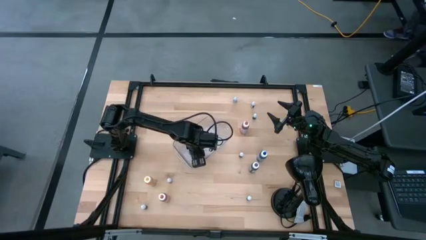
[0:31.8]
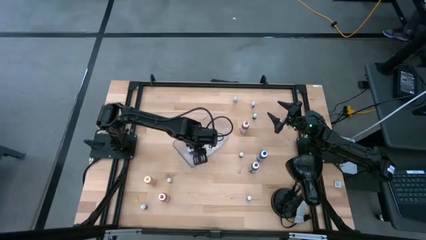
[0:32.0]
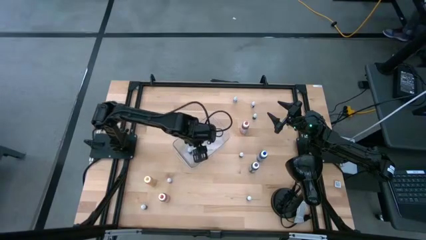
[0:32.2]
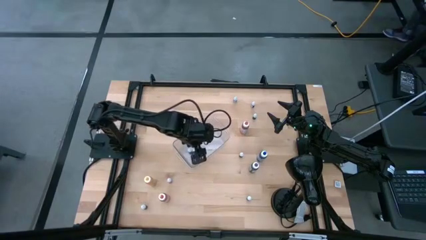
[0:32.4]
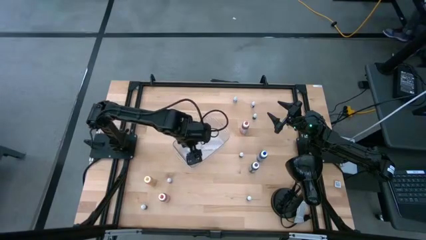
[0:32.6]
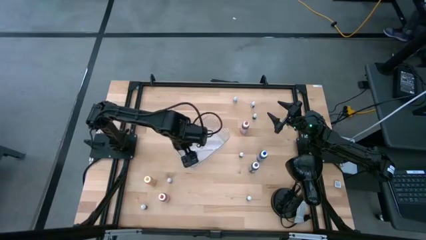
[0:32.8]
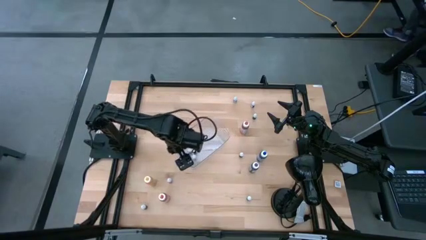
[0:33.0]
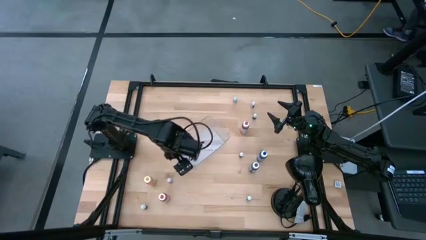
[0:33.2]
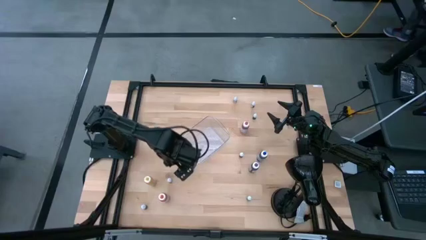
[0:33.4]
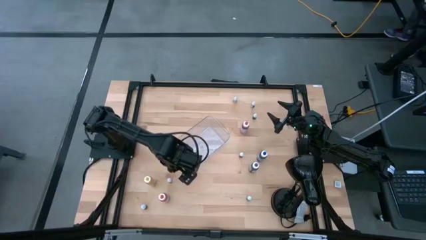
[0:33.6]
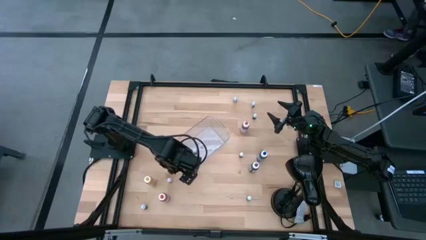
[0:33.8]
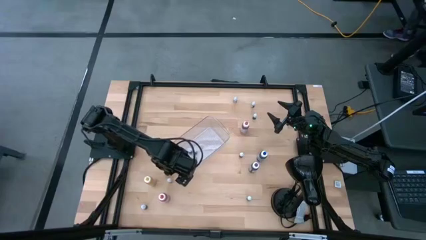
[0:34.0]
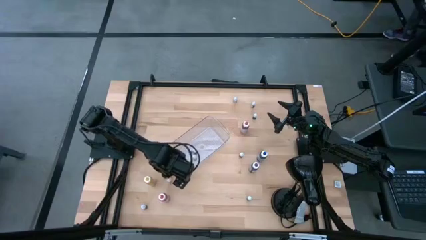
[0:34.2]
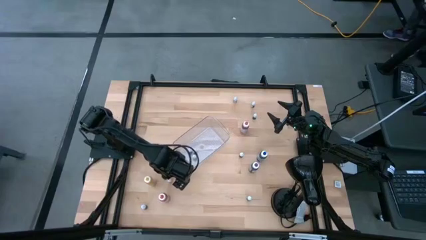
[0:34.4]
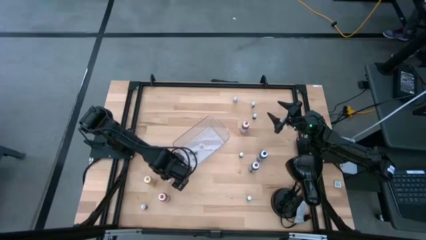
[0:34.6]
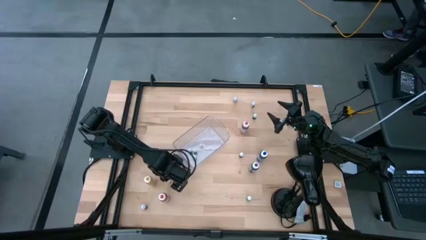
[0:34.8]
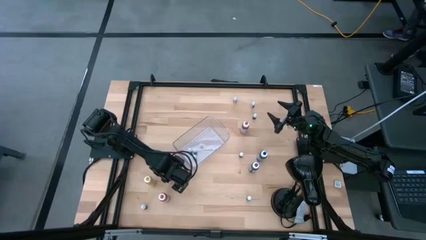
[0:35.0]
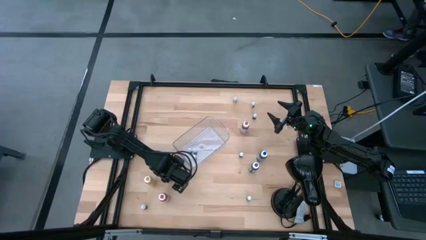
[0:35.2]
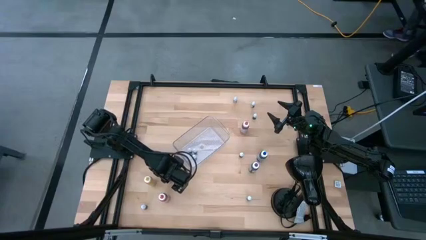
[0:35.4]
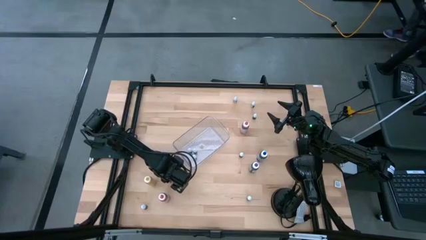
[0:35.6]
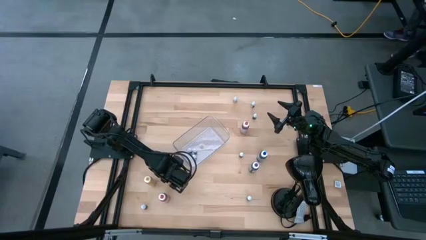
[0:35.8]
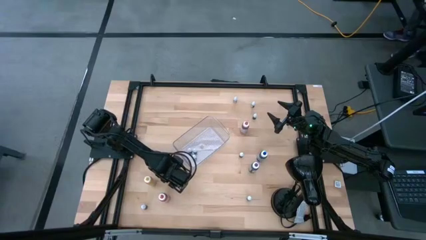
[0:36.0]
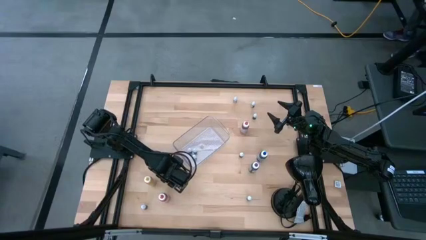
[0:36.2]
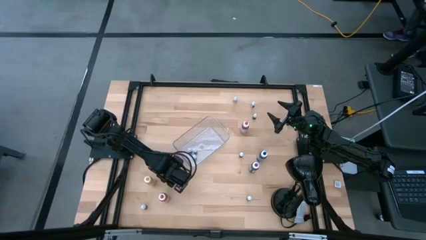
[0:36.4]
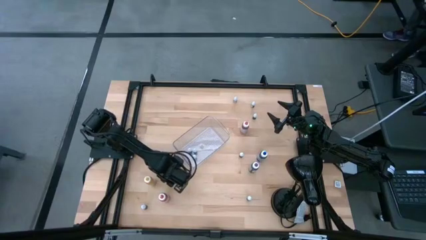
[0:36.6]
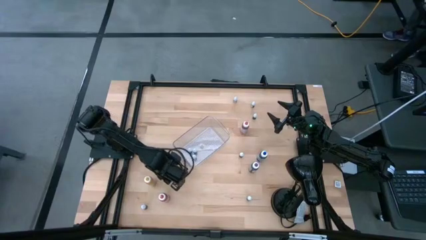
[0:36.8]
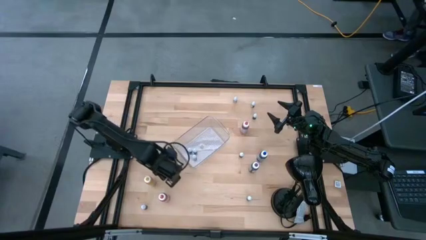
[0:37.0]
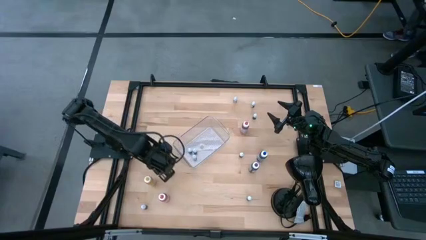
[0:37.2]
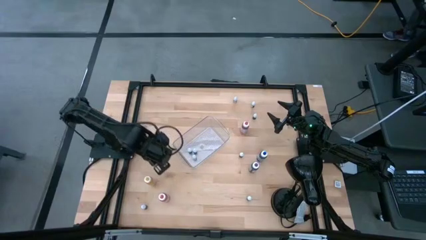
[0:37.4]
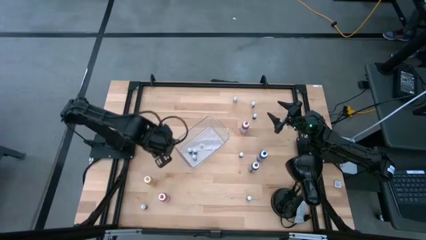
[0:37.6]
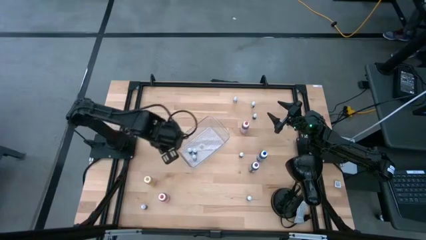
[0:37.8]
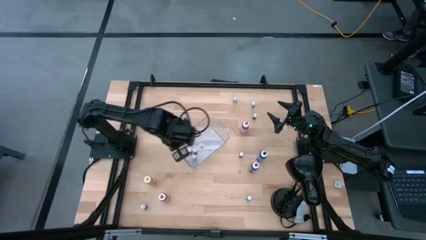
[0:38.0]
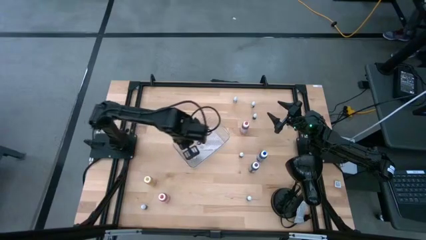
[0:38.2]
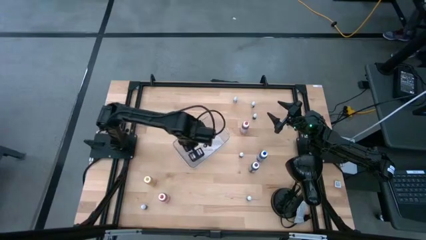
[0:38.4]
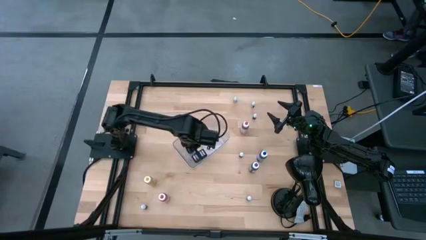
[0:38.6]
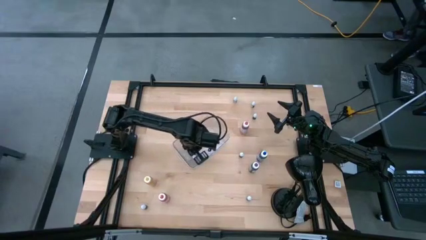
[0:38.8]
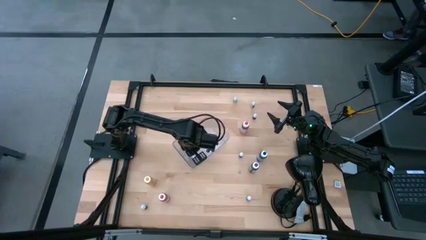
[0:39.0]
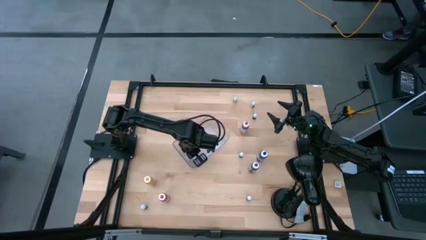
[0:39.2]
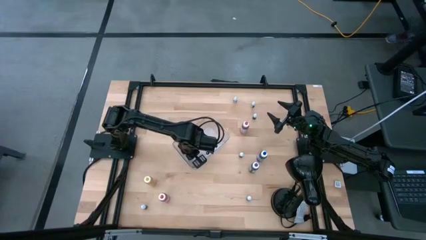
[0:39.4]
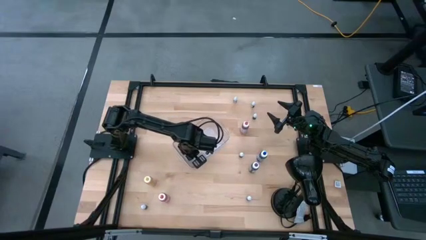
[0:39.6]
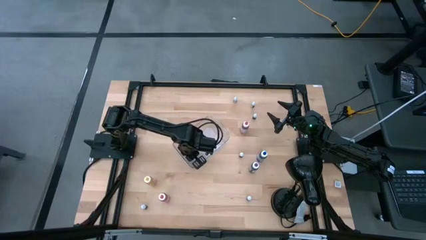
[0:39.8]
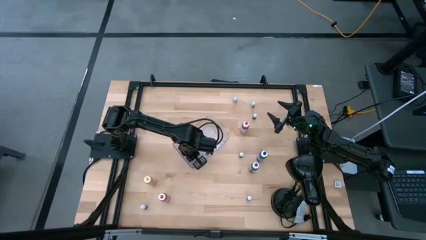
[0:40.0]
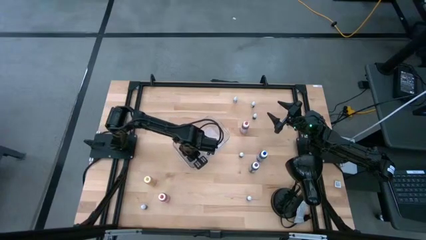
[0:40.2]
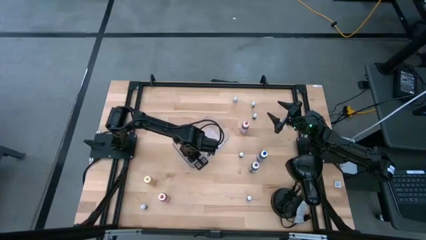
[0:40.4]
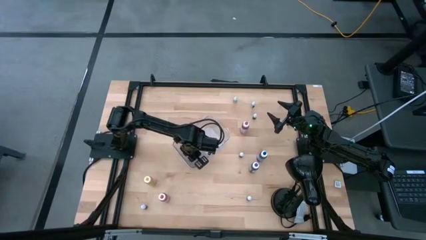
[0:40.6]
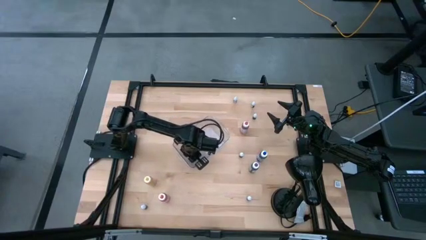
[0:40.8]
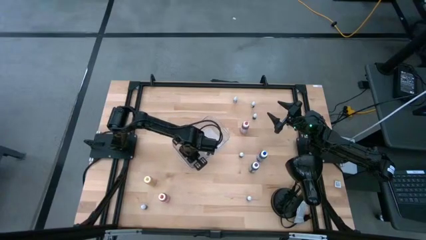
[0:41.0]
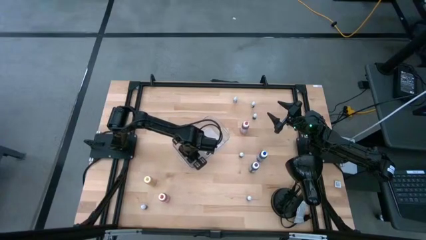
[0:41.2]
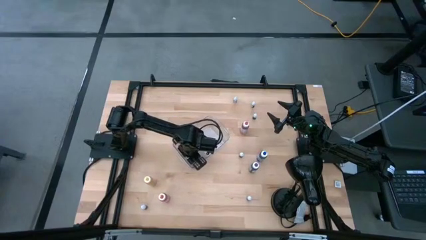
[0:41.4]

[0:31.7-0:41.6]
Task: Pick & Place food coloring
Put the small black food coloring bottle into the transparent bin

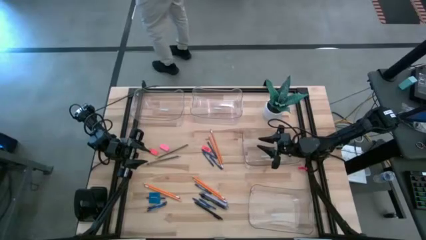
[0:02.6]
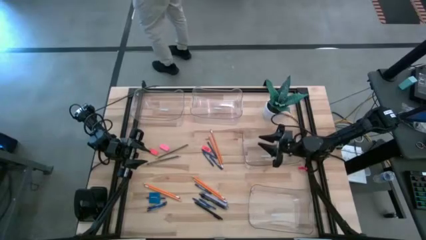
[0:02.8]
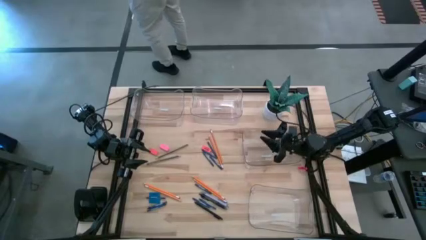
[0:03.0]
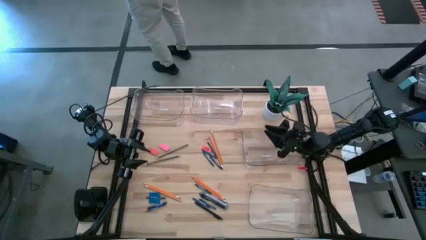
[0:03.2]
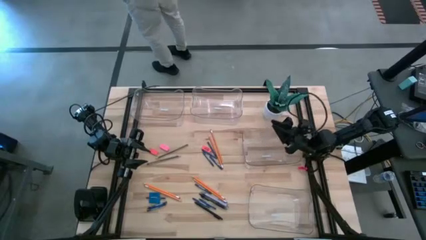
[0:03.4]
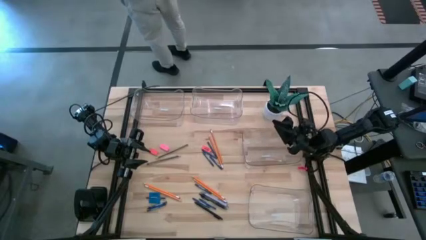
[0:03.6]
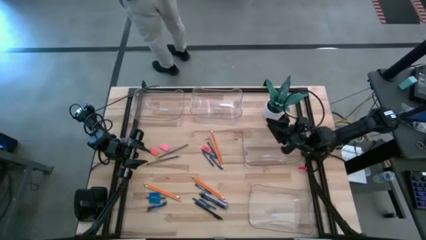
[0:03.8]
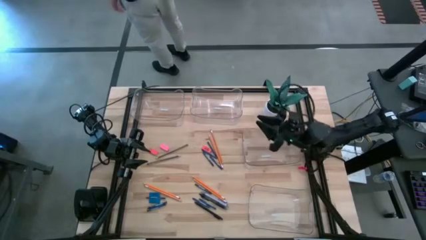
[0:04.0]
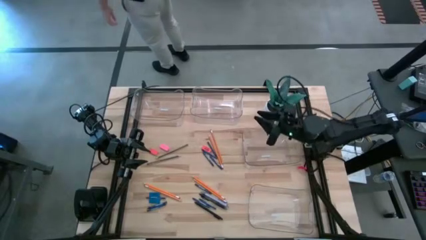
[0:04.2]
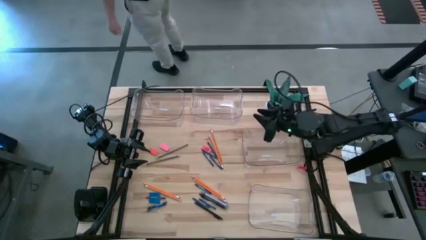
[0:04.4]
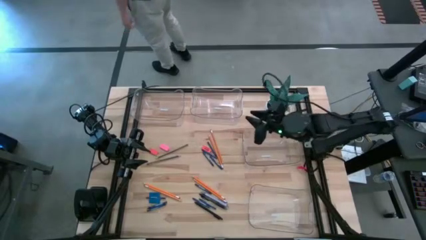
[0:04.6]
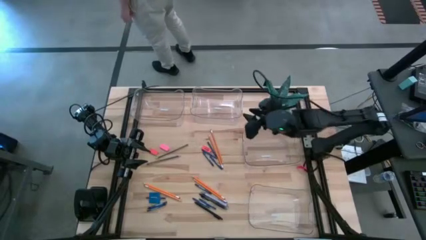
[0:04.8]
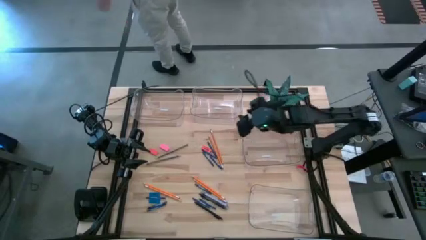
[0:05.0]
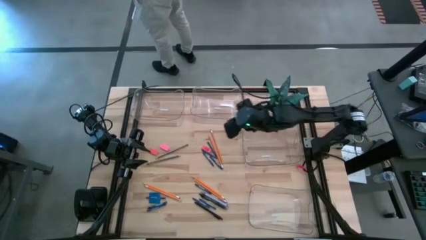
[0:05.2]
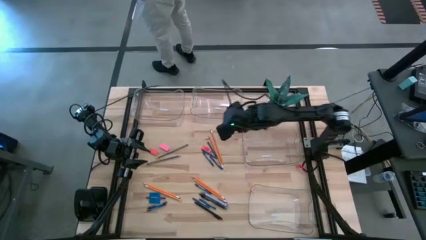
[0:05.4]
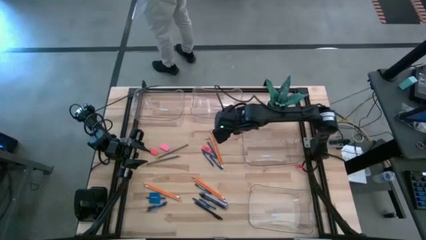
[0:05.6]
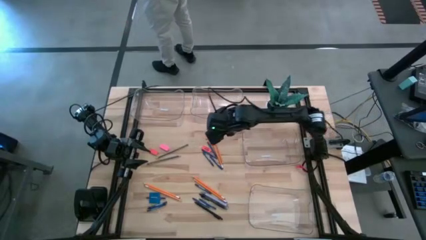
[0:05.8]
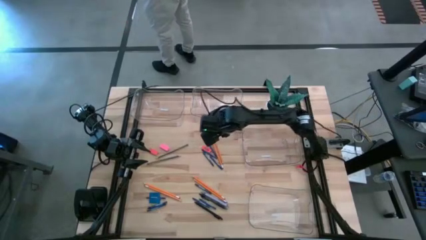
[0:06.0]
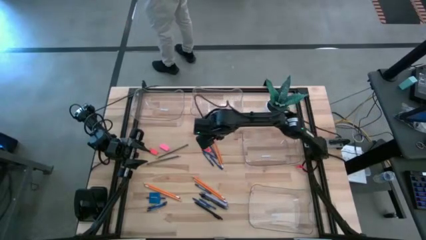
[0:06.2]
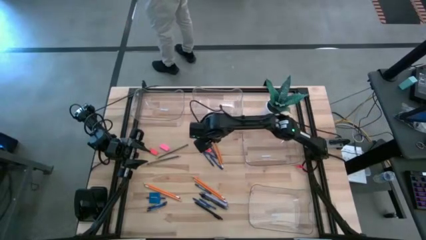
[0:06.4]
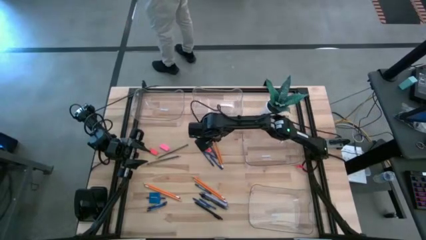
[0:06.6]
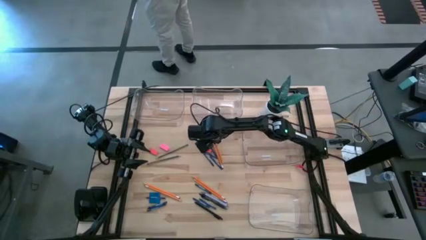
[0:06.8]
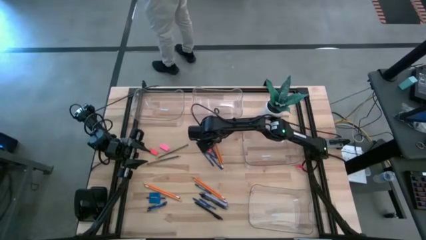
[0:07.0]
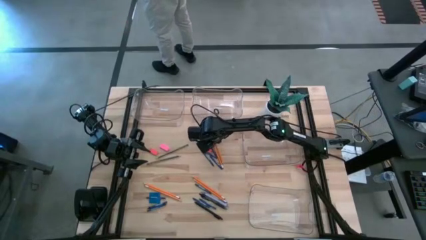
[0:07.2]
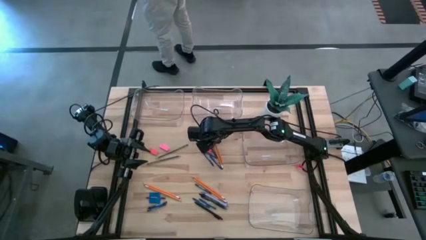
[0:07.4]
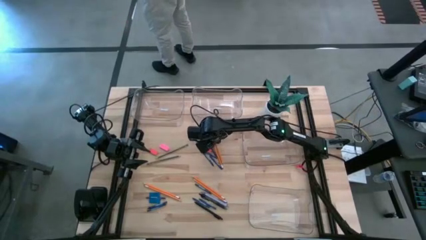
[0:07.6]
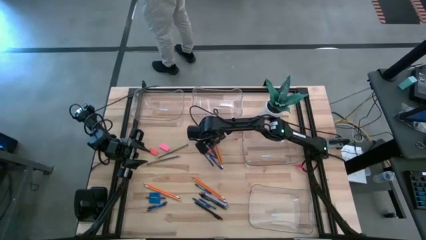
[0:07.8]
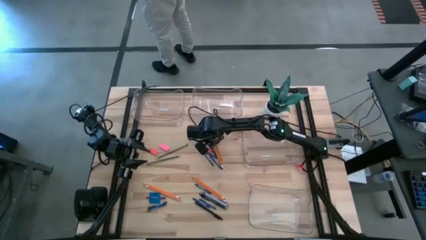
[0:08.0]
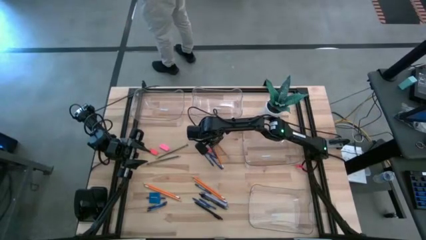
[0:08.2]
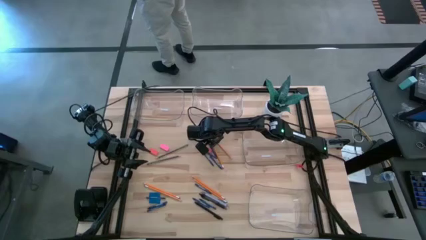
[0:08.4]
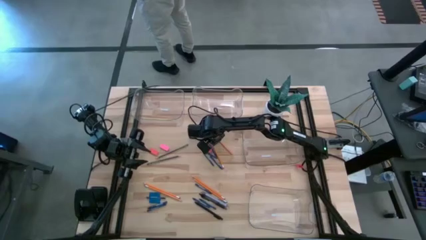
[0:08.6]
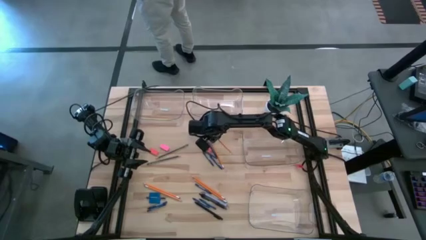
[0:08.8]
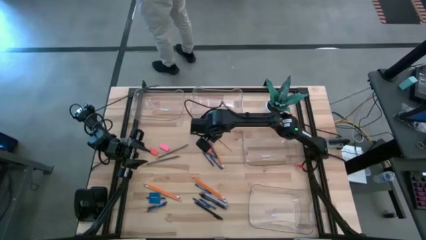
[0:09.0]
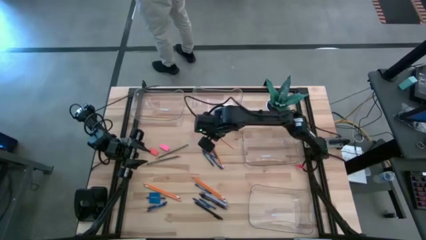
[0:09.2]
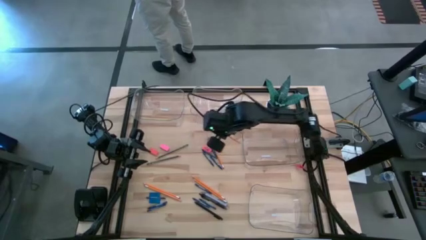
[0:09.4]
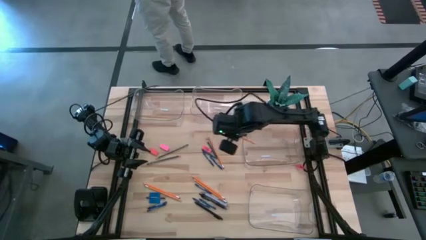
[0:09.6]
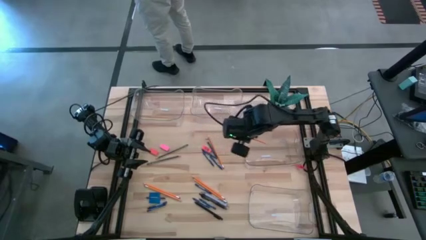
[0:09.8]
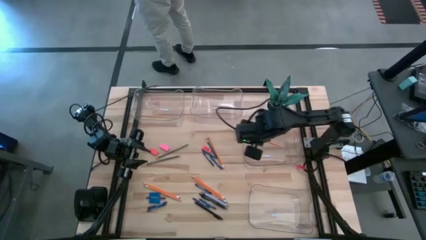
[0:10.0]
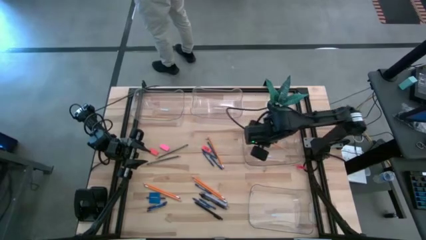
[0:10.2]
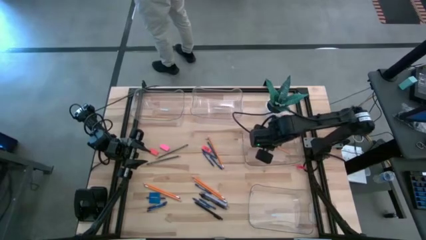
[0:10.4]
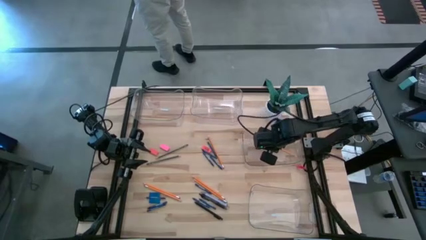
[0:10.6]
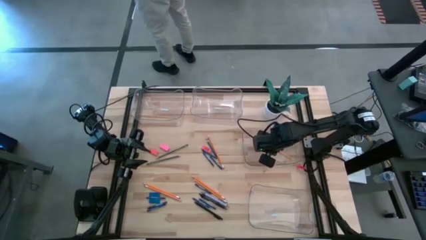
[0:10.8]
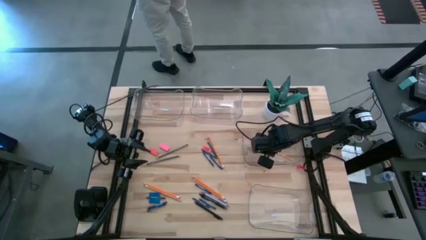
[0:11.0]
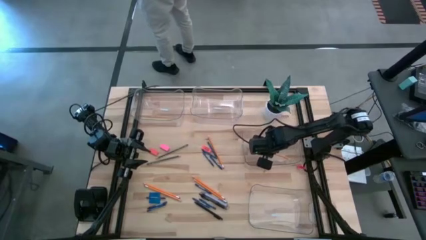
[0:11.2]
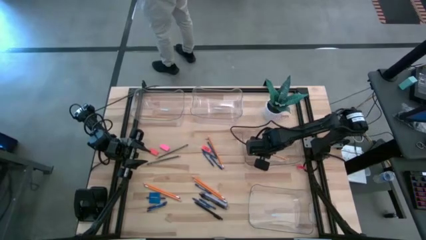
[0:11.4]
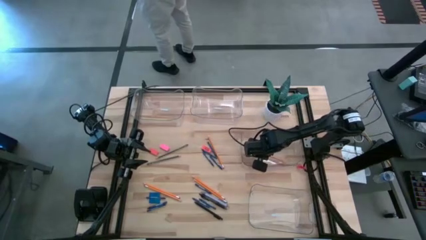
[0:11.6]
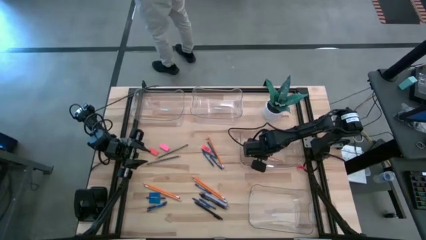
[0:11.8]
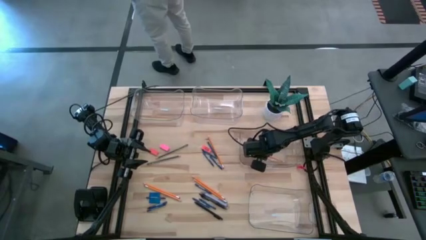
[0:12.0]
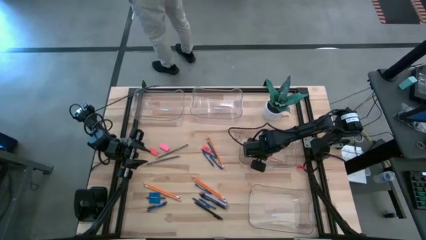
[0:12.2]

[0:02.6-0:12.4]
Task: Sort crayons/erasers/pens/pencils in bins
Put the orange pencil into the middle transparent bin
